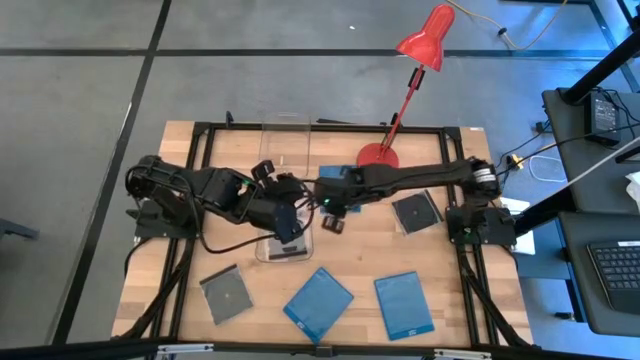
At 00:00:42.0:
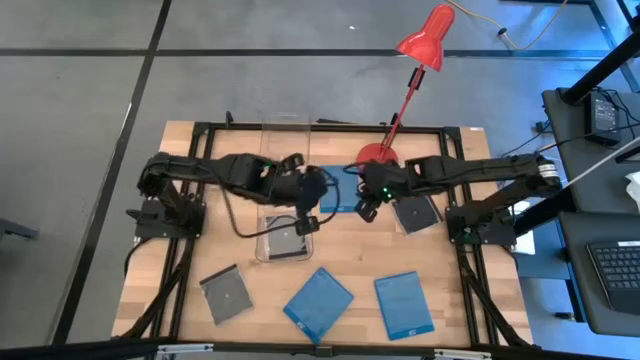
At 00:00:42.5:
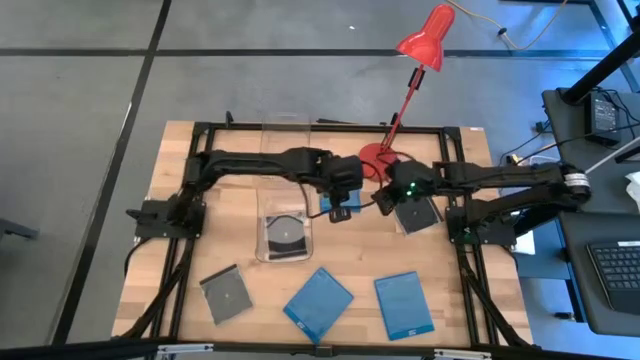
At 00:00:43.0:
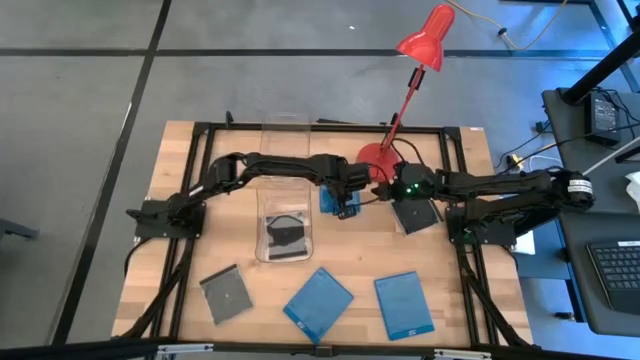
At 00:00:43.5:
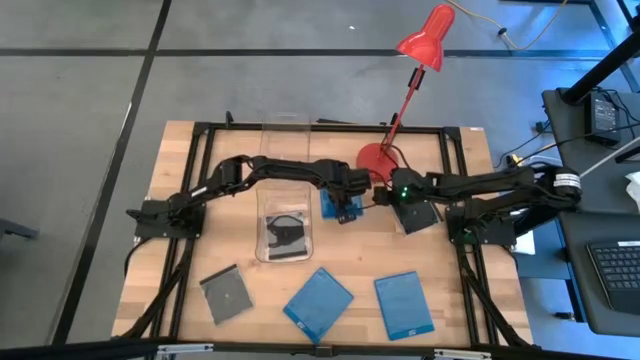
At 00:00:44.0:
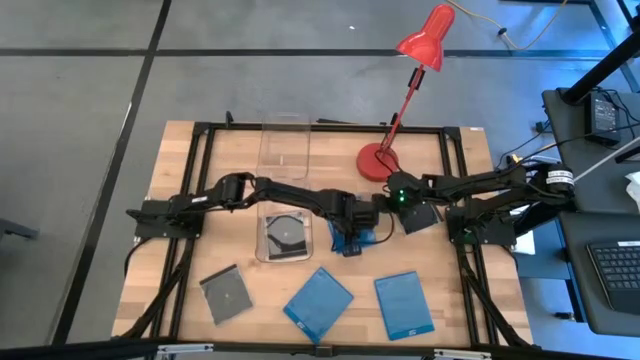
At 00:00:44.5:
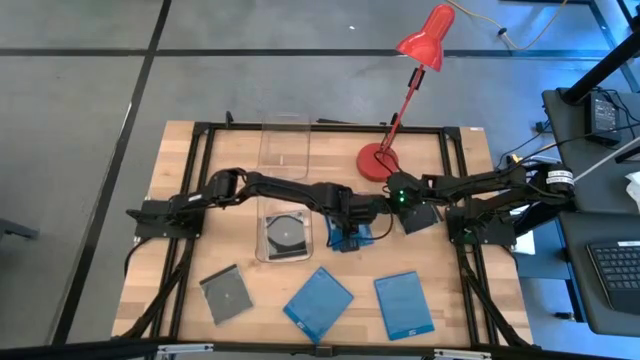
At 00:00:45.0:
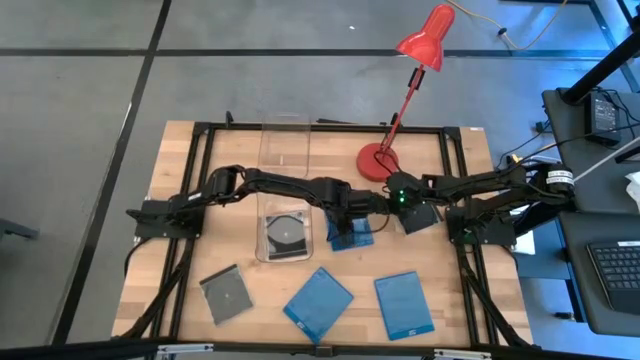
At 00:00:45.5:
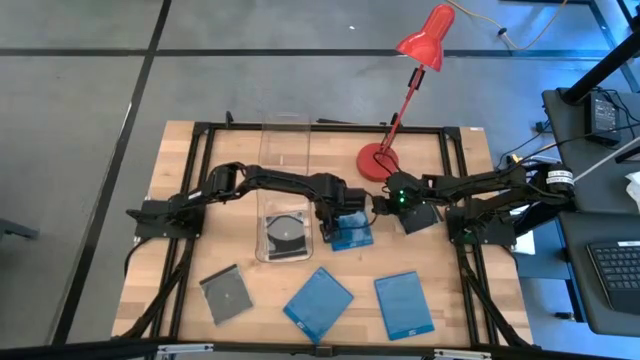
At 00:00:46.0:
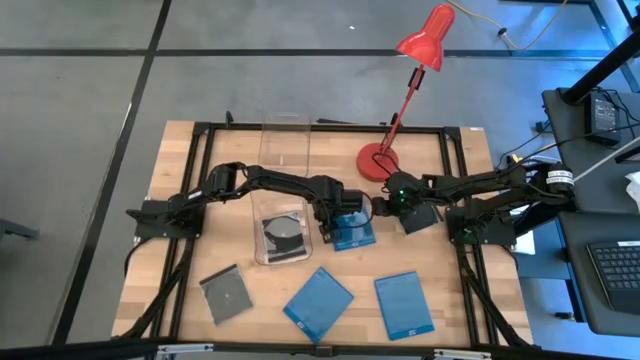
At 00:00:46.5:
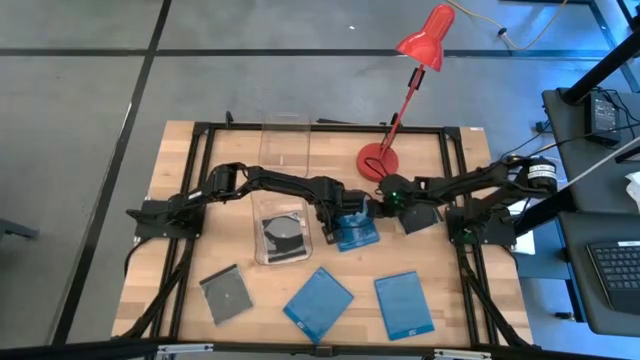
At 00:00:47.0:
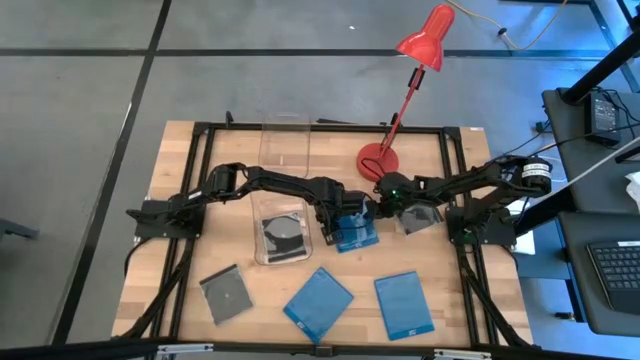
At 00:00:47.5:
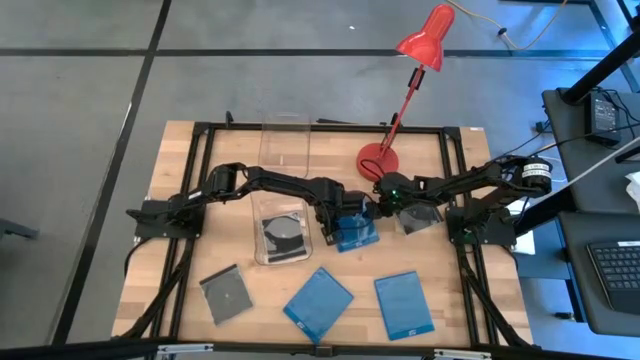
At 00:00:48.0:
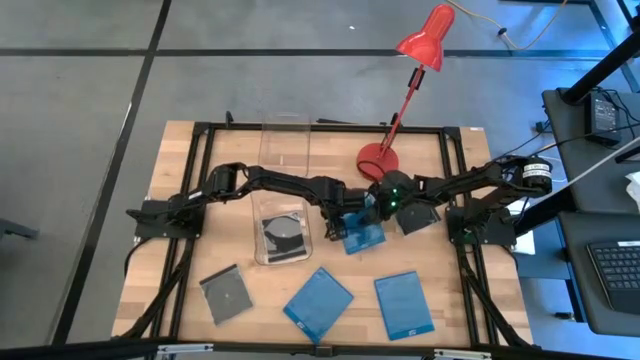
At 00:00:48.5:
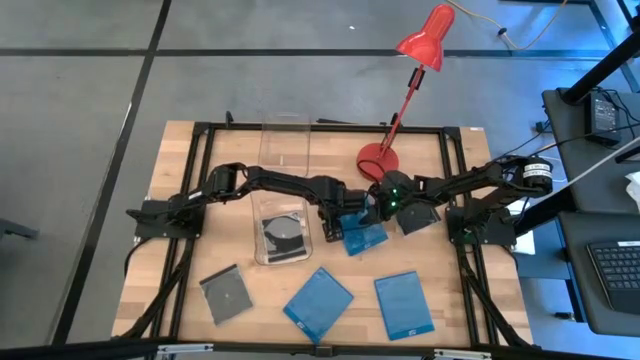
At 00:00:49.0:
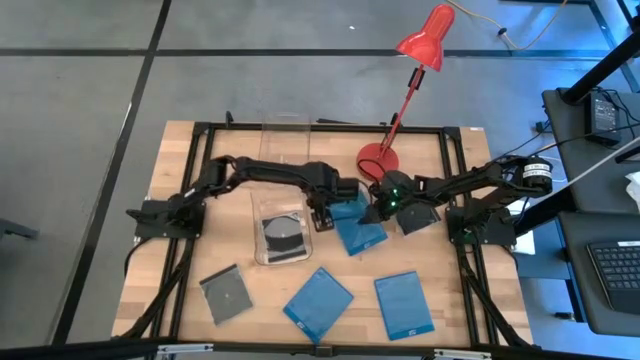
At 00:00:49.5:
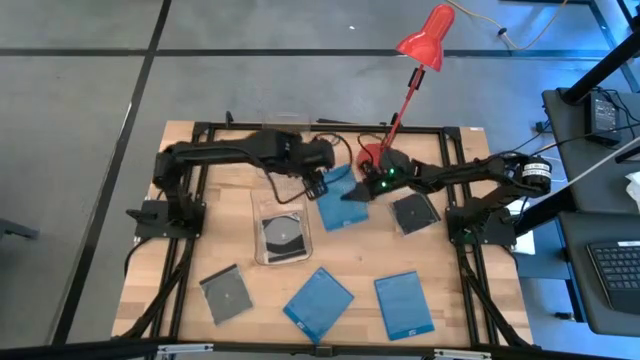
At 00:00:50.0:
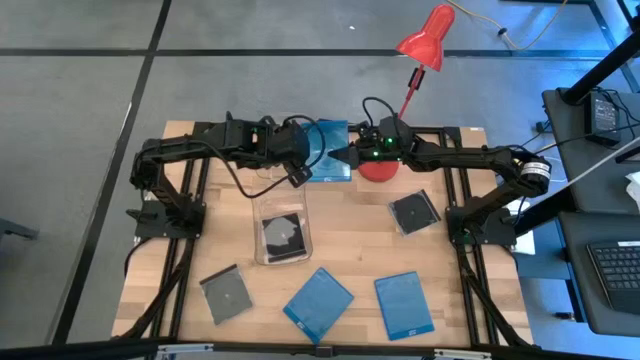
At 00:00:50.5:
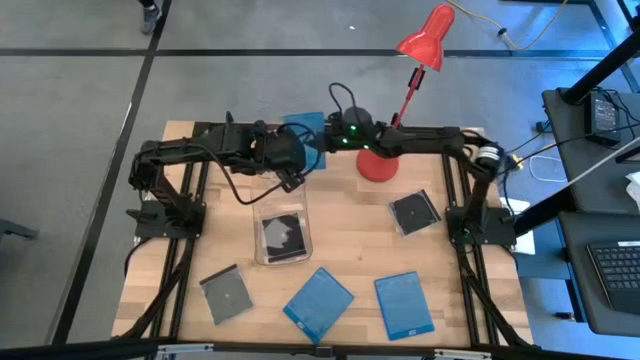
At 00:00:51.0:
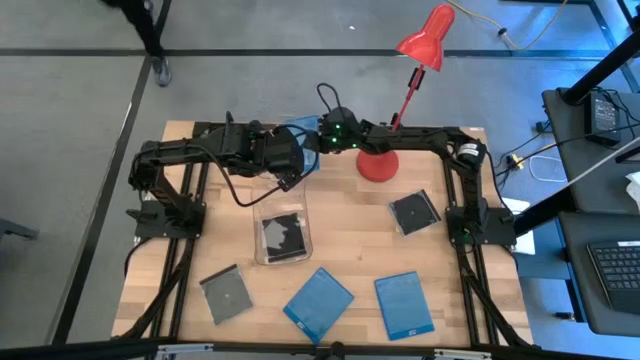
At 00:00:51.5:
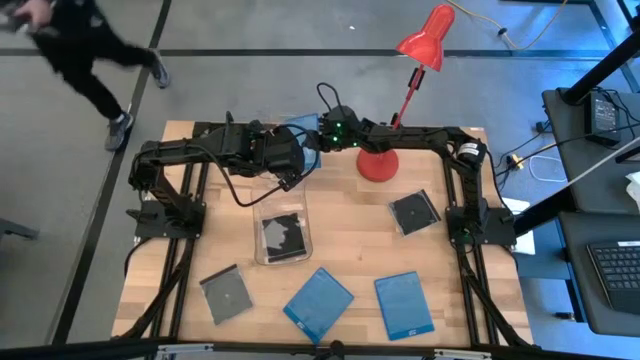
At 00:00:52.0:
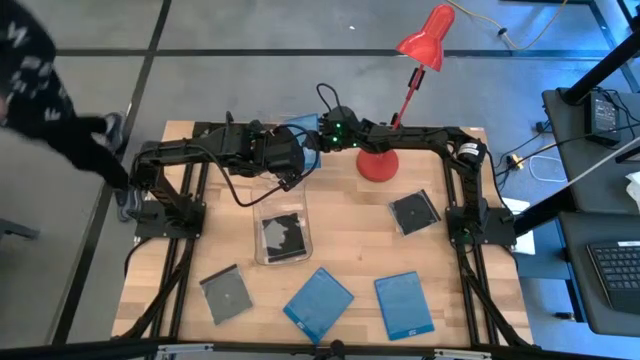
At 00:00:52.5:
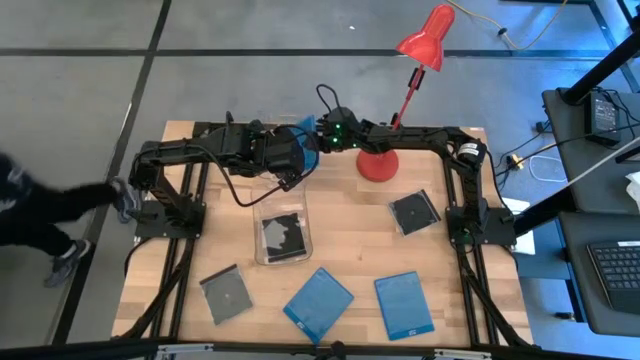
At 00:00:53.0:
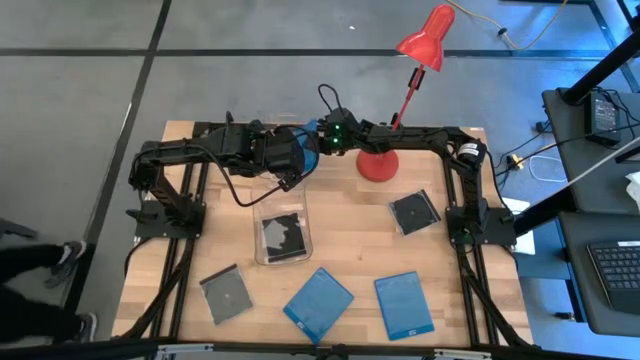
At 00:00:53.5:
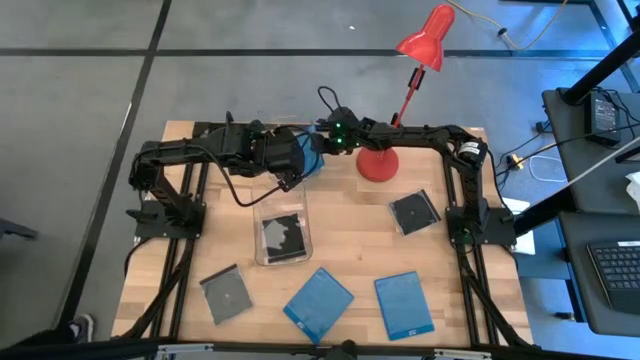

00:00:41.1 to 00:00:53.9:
Task: Pick & place jewel cases by type
Put the top left blue cd case into the top transparent bin

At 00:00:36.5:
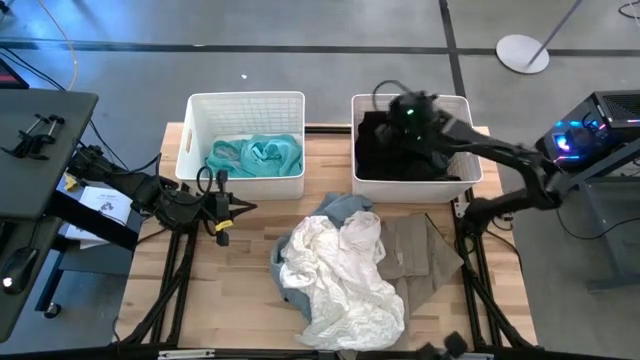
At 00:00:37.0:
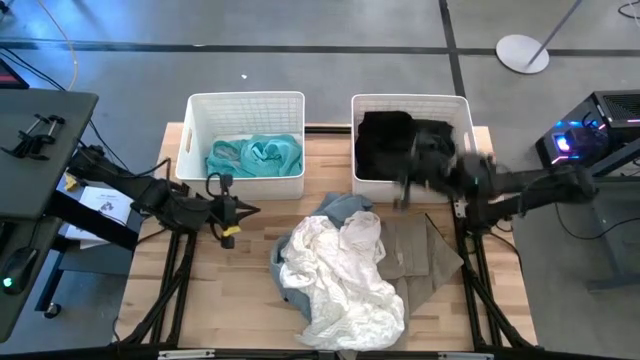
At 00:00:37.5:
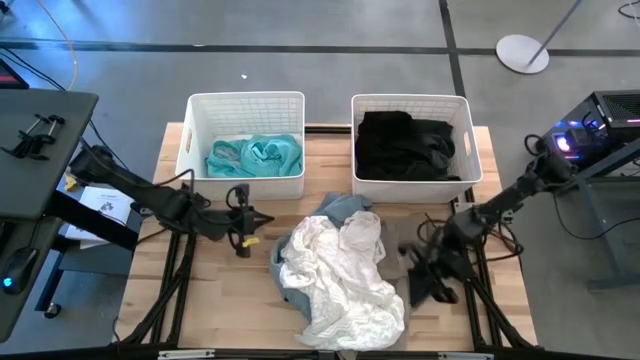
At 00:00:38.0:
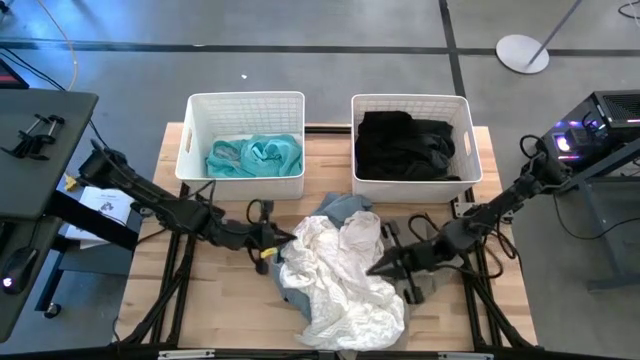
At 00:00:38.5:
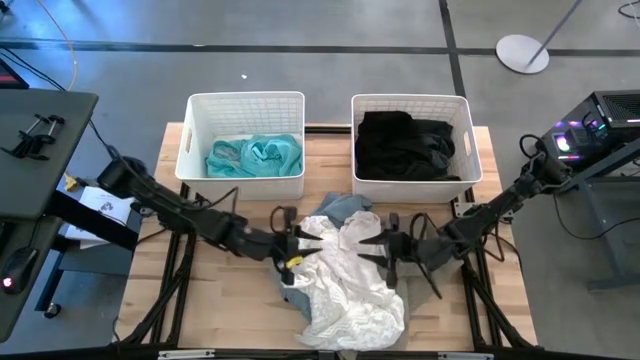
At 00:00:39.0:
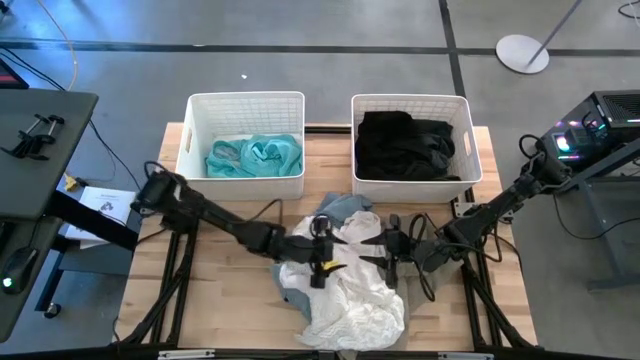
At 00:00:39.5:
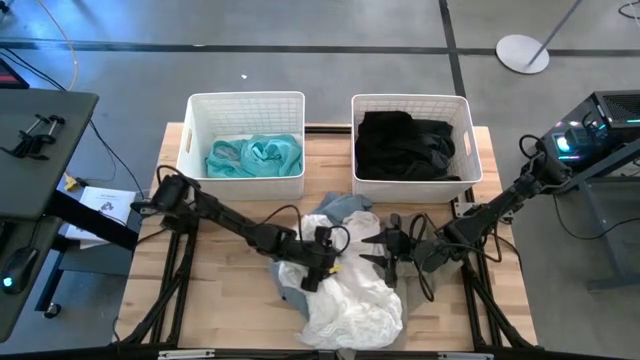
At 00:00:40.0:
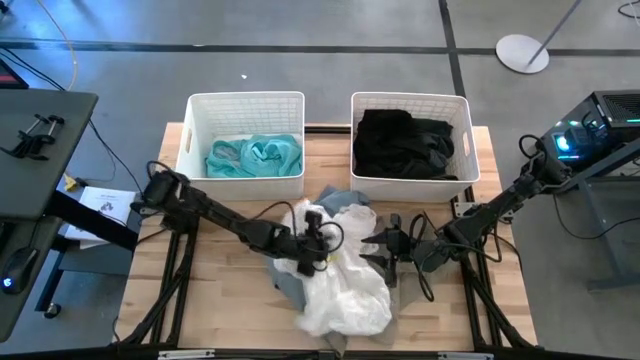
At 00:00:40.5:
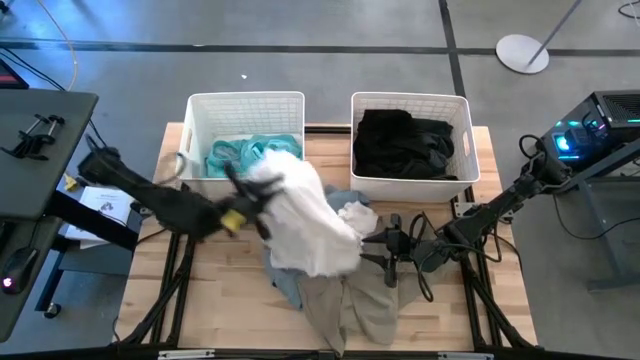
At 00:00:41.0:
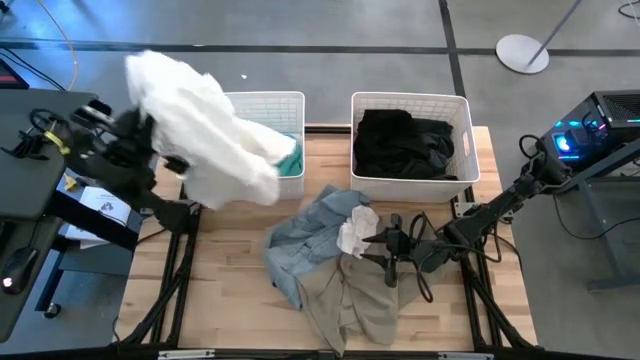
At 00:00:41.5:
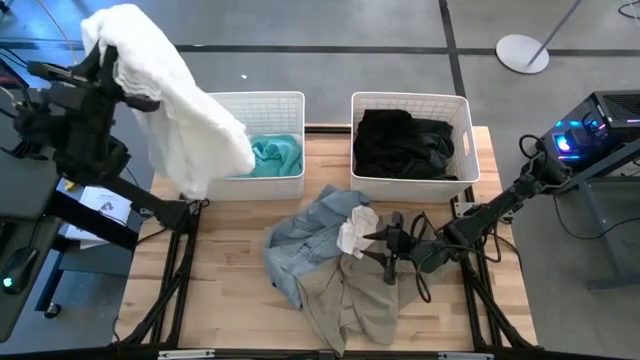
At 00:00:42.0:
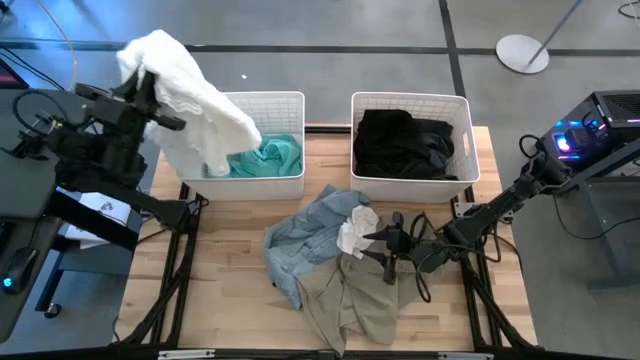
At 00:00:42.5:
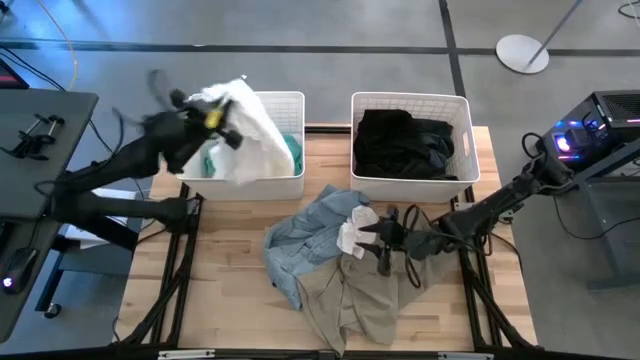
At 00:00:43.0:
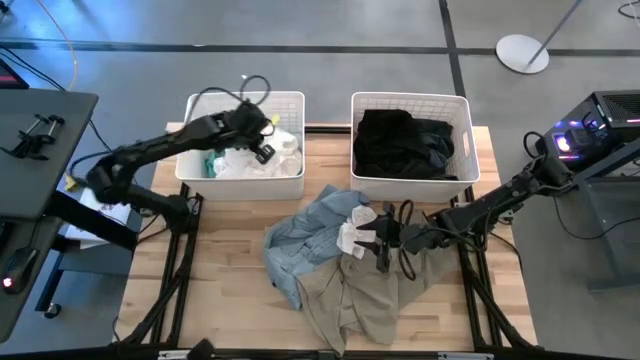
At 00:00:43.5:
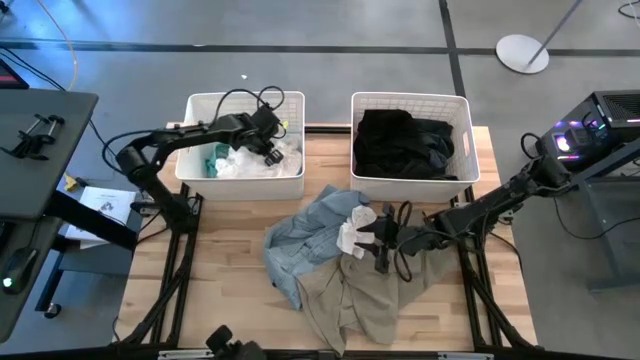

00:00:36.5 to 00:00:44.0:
Task: Sort clothes
Put the white shirt into the left white laundry bin
